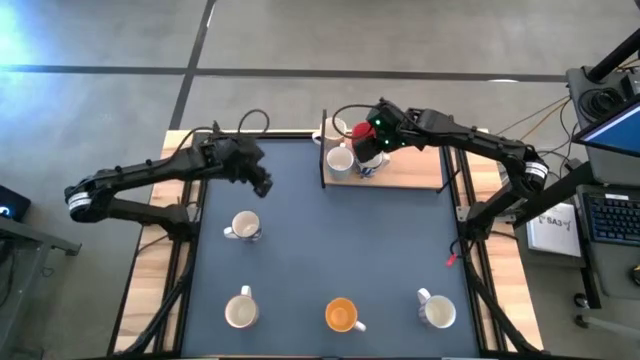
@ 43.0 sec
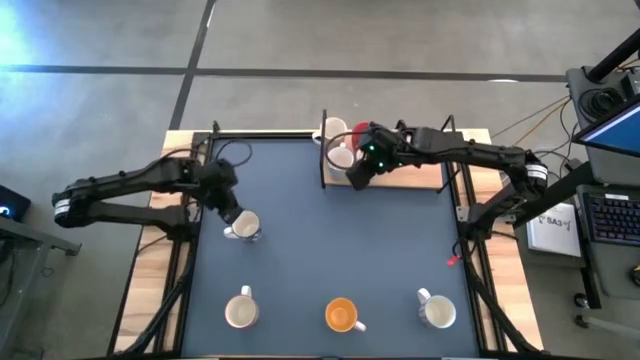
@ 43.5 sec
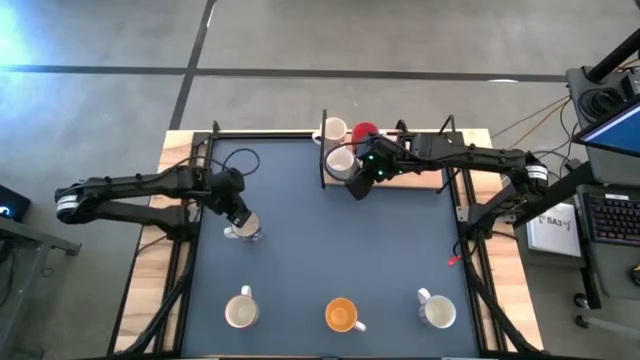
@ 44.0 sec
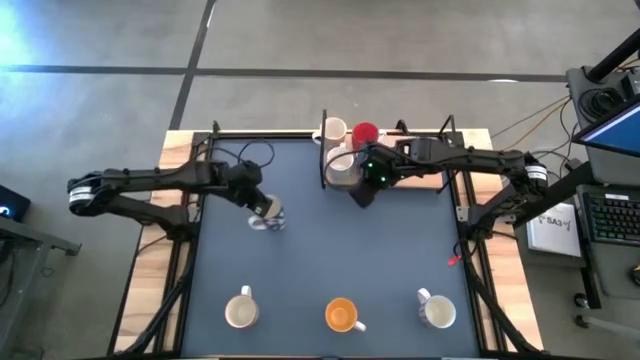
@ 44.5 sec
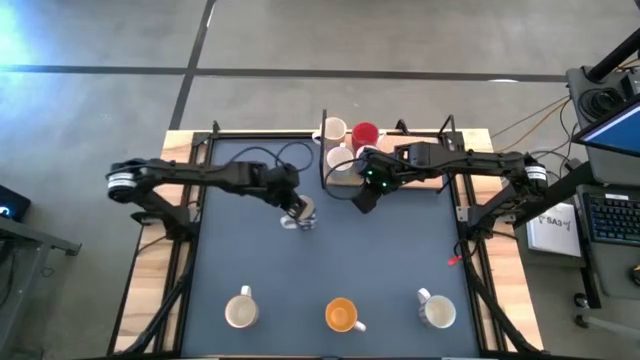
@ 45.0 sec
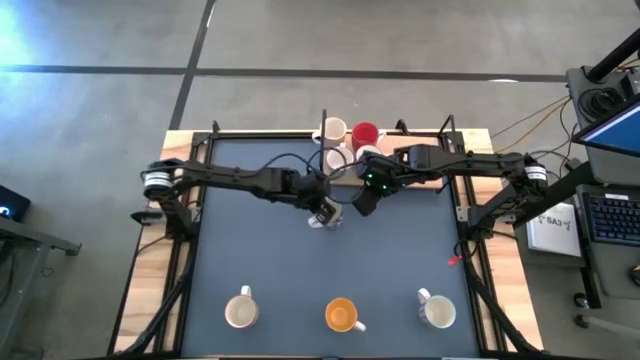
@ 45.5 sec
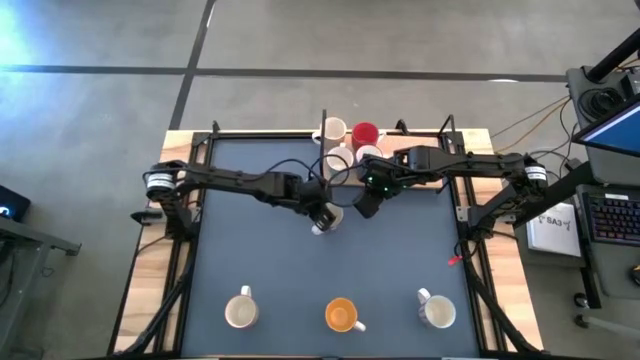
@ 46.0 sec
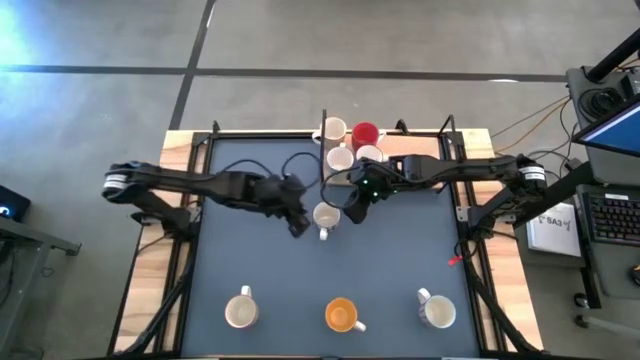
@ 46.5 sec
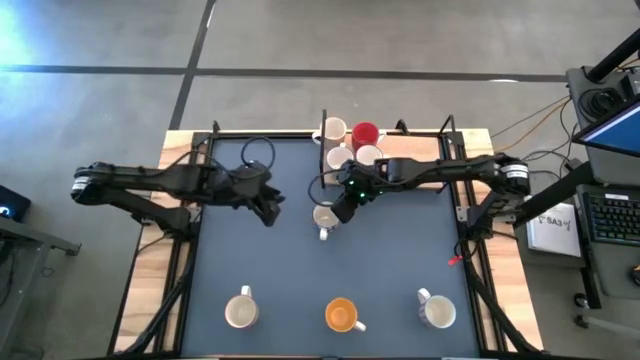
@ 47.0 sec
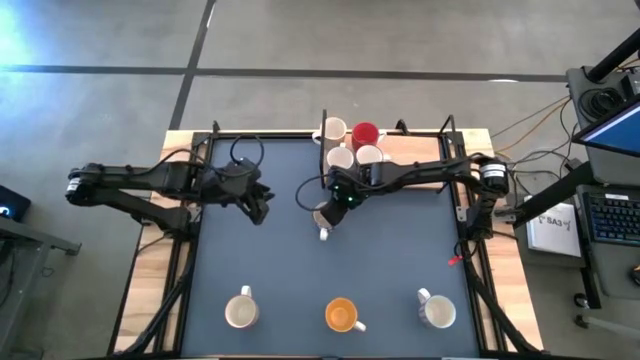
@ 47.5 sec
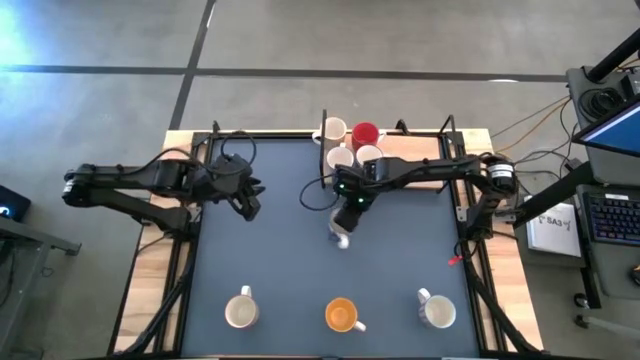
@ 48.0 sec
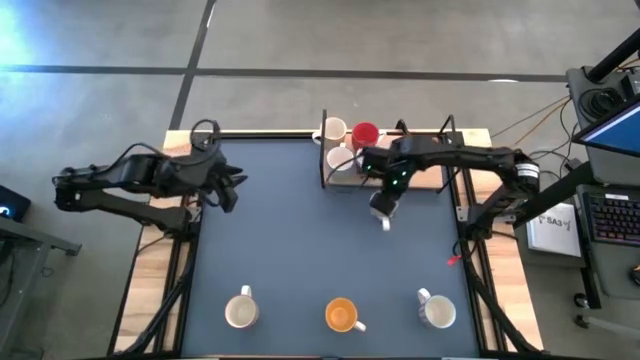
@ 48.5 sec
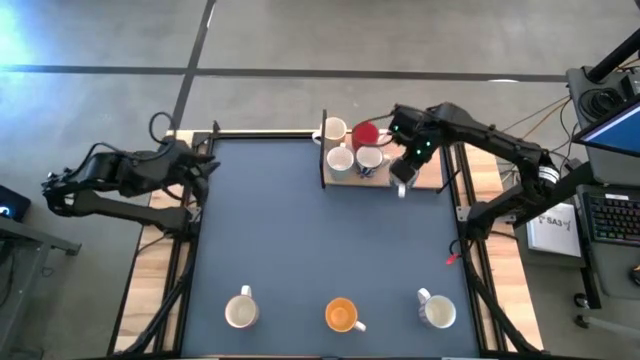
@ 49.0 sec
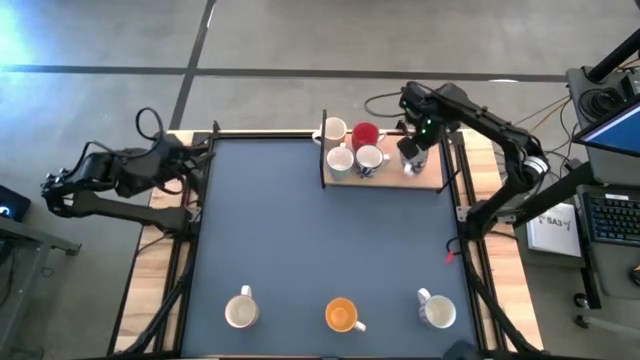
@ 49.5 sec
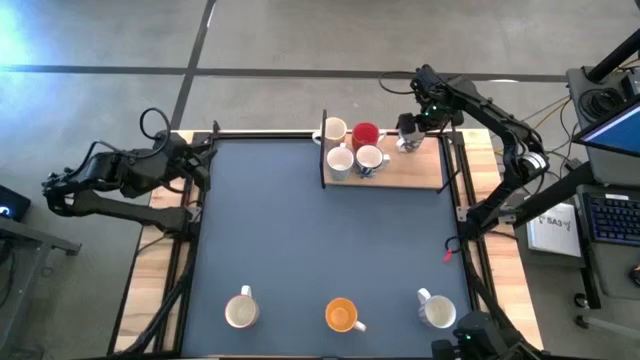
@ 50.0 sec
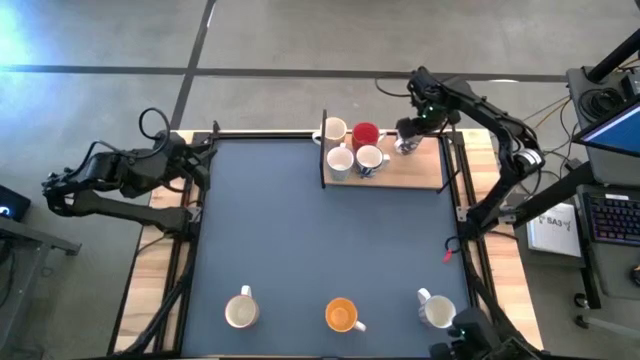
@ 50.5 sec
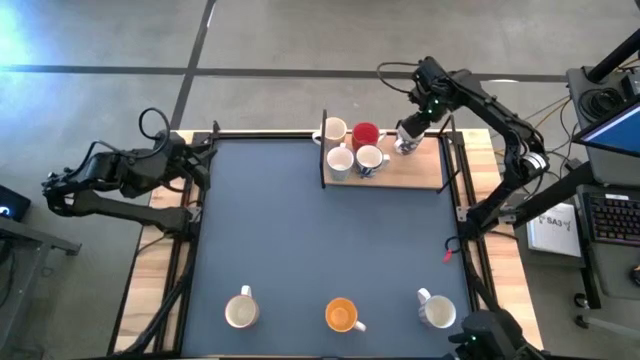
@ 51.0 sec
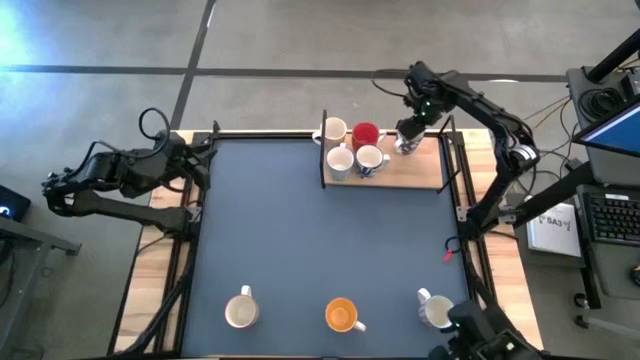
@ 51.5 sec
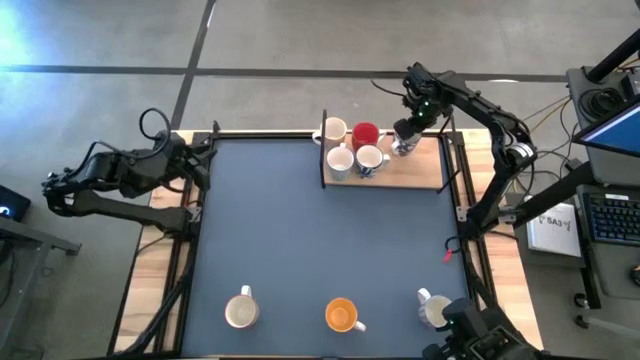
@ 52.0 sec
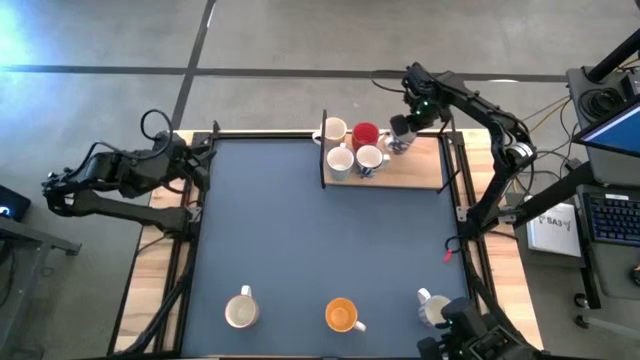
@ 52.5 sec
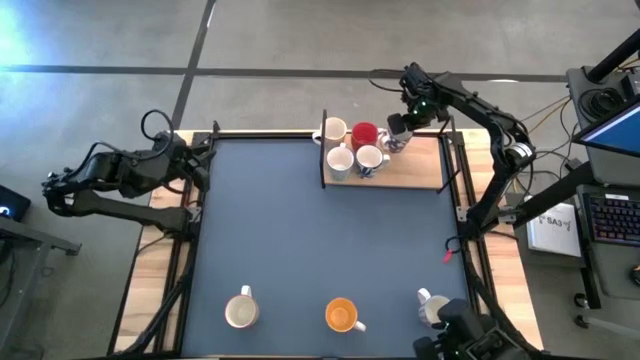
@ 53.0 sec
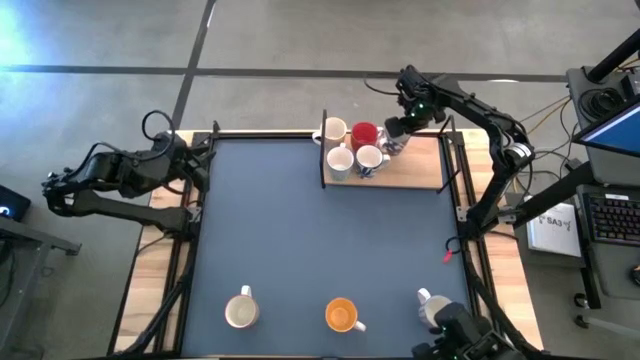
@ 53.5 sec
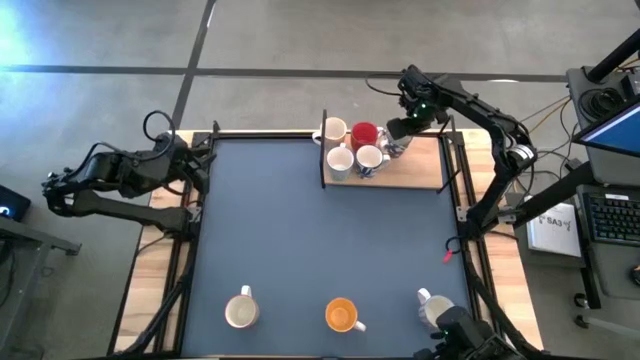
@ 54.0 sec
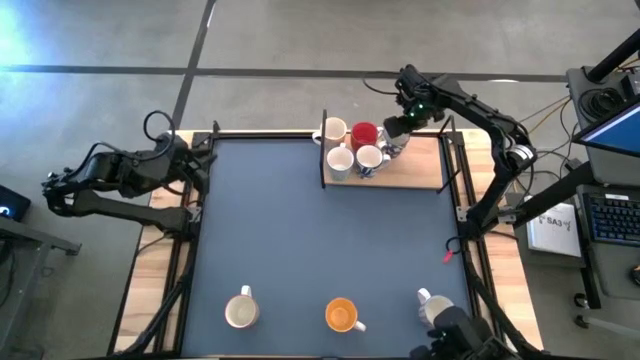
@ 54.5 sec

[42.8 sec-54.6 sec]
Task: Place coffee mugs
Put the blue mug on the shelf

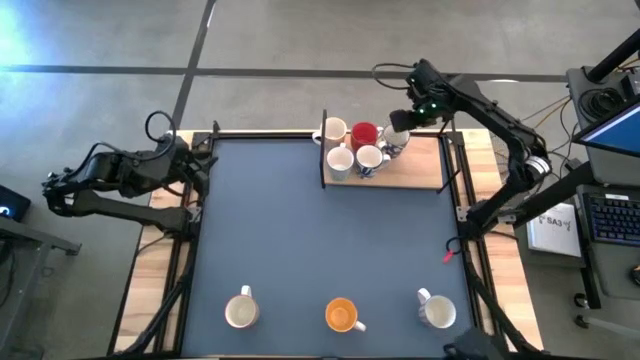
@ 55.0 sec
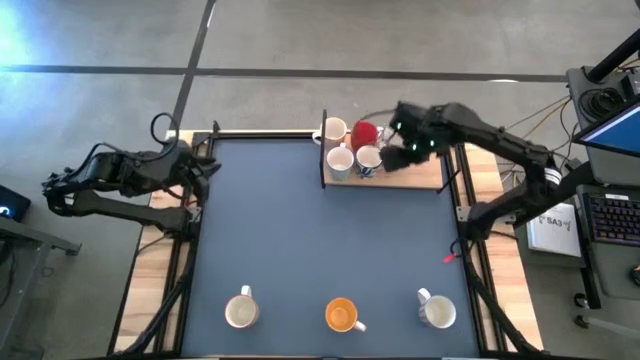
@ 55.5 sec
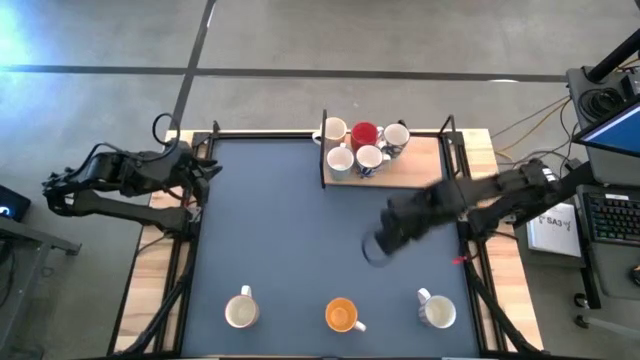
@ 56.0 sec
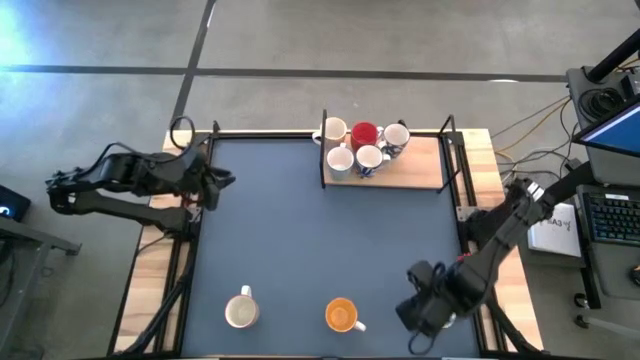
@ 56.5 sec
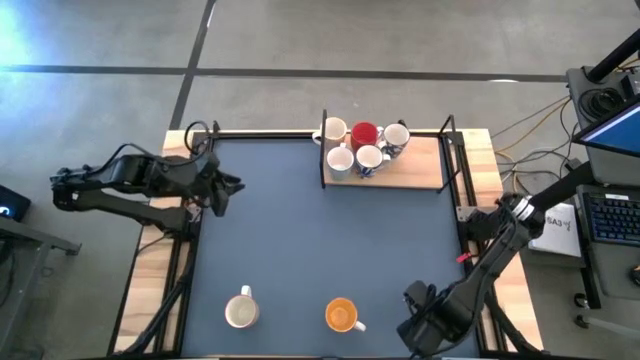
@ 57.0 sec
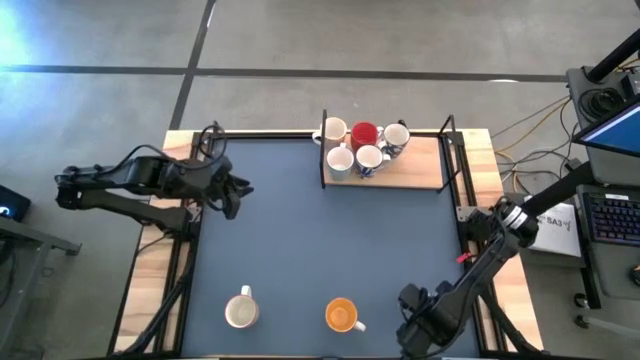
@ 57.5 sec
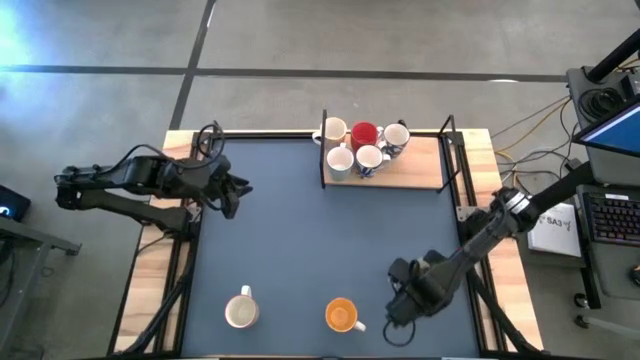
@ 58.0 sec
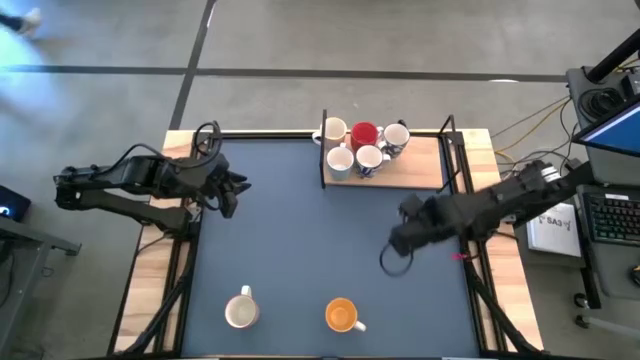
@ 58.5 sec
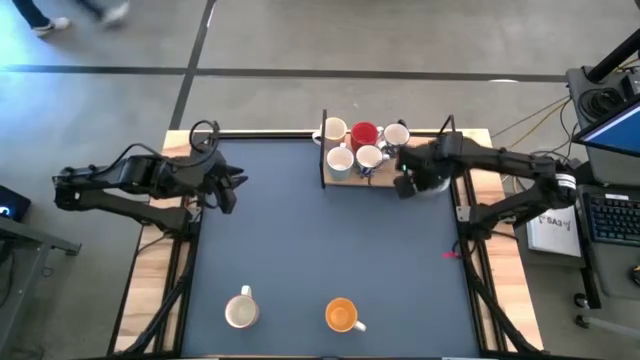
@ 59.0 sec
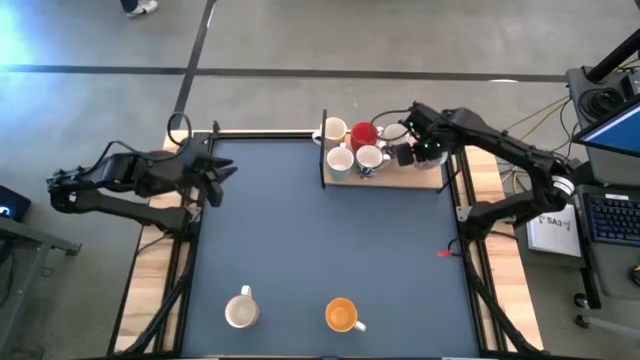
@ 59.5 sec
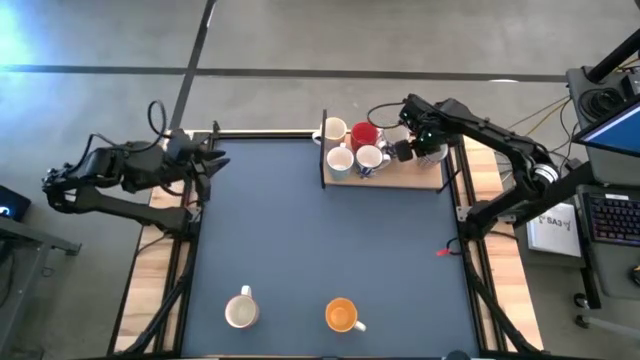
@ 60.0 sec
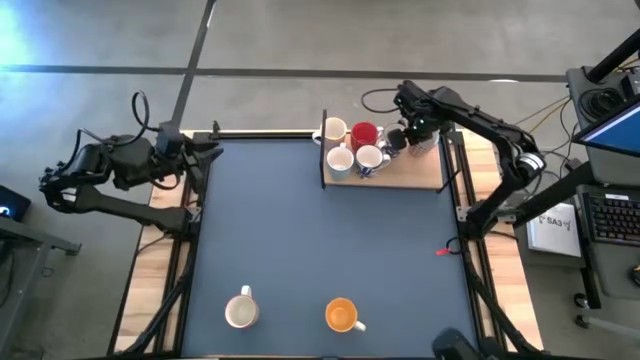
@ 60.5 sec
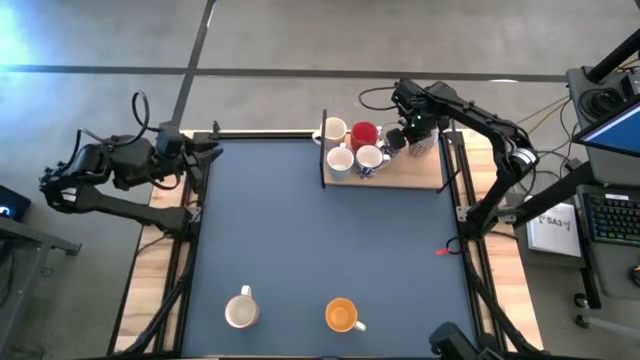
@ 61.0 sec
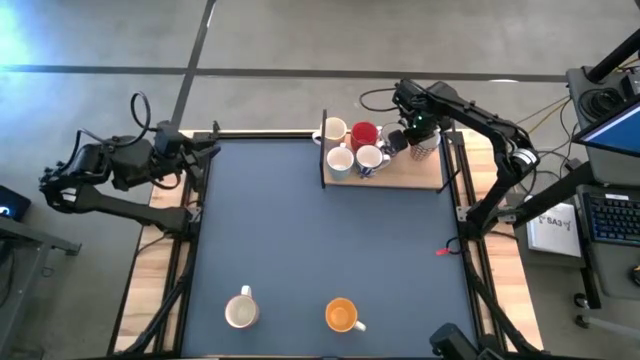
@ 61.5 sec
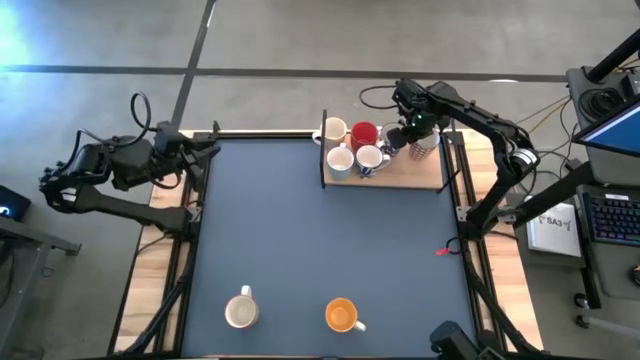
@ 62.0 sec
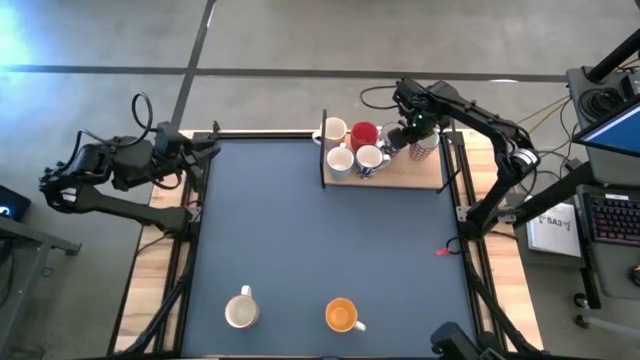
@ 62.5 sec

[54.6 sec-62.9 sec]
Put the dark red mug on the shelf
